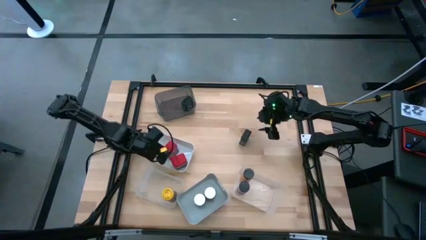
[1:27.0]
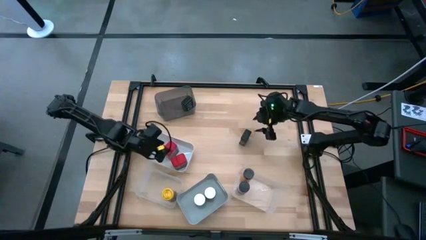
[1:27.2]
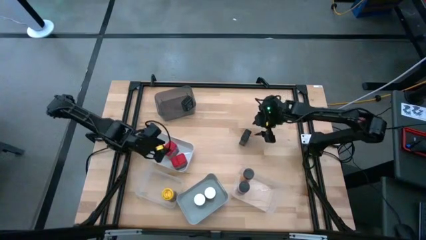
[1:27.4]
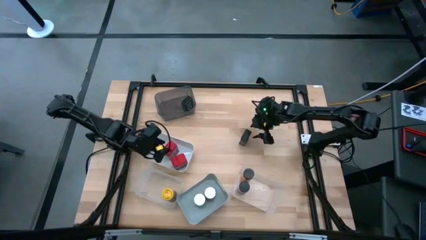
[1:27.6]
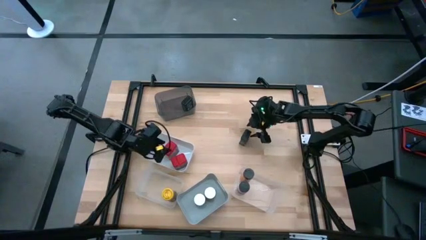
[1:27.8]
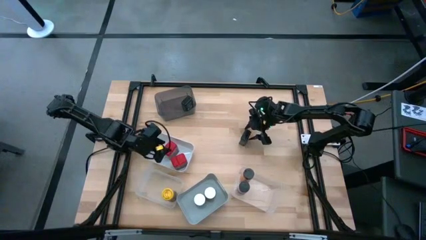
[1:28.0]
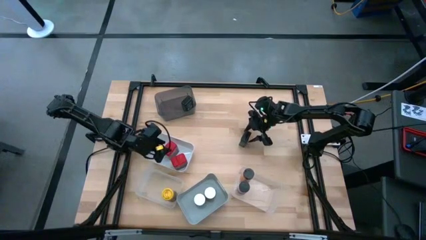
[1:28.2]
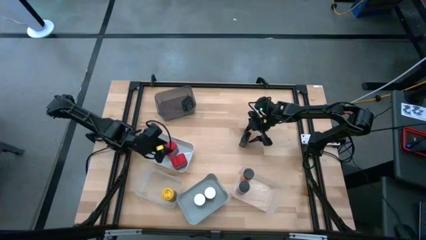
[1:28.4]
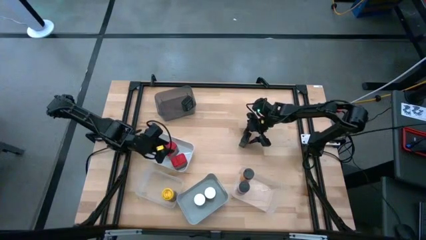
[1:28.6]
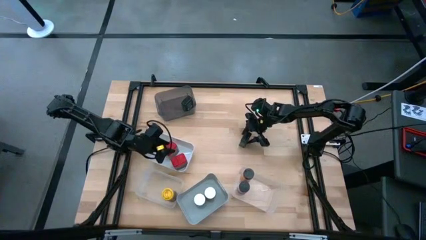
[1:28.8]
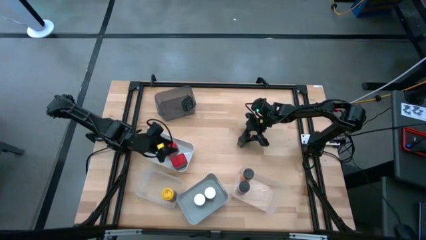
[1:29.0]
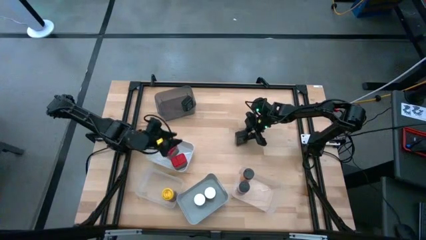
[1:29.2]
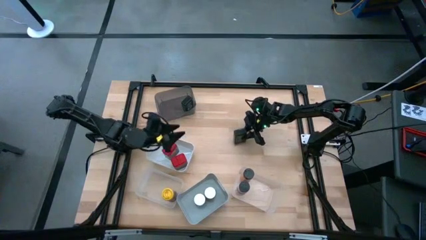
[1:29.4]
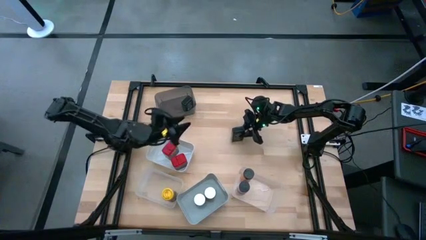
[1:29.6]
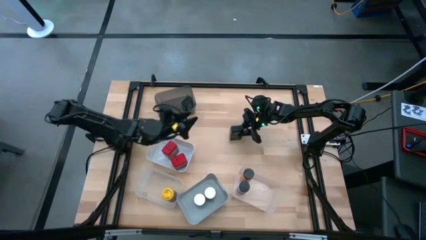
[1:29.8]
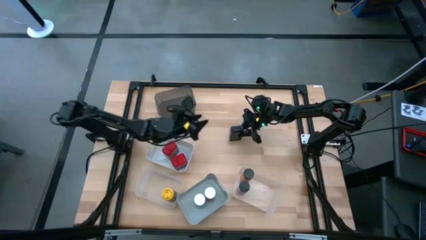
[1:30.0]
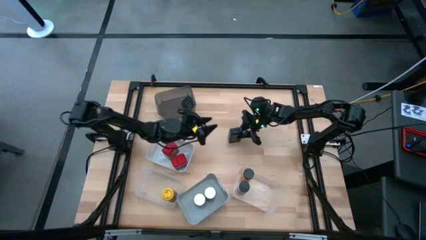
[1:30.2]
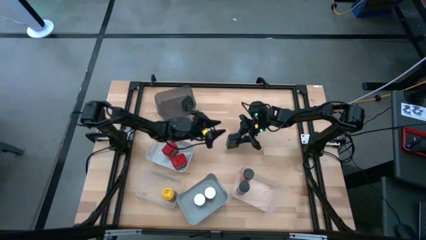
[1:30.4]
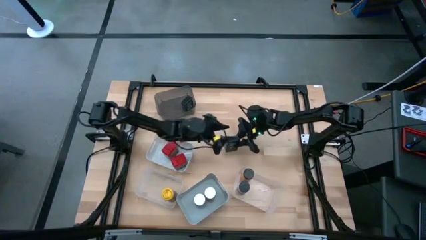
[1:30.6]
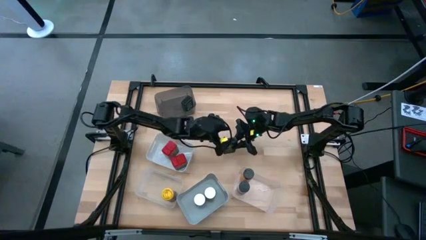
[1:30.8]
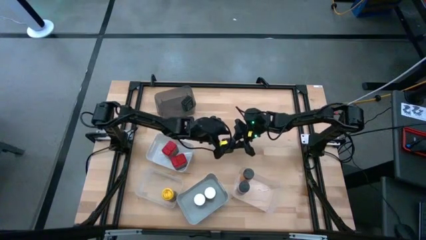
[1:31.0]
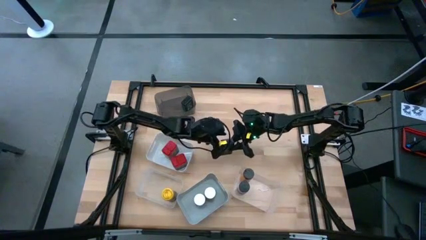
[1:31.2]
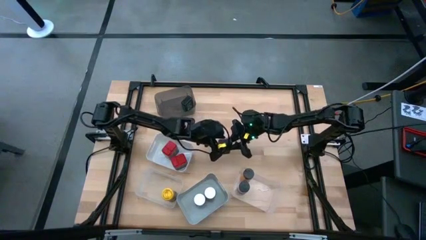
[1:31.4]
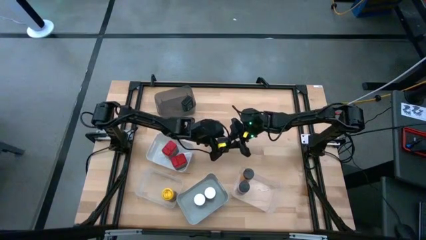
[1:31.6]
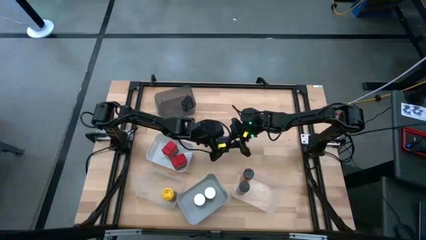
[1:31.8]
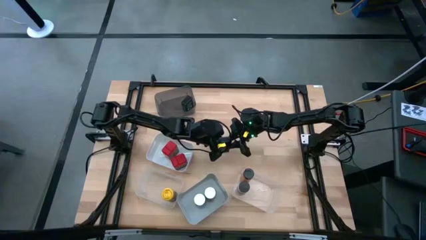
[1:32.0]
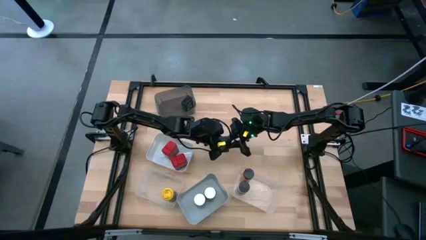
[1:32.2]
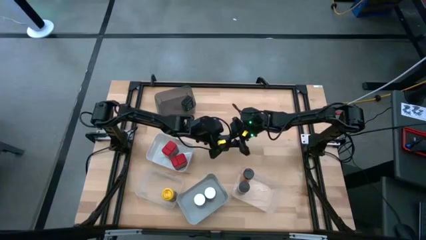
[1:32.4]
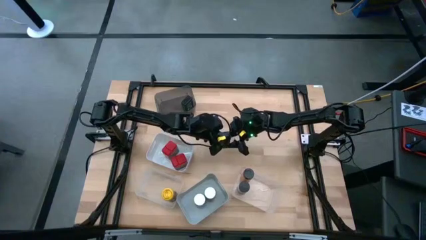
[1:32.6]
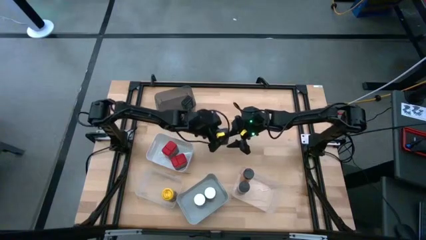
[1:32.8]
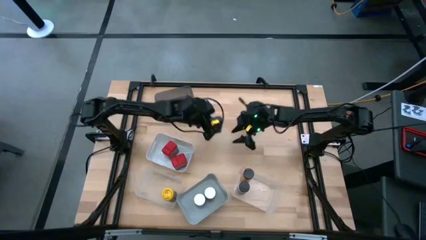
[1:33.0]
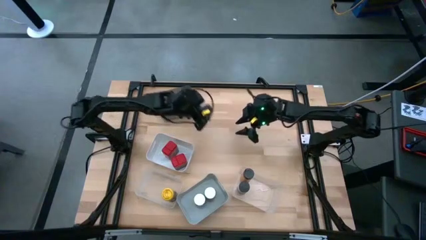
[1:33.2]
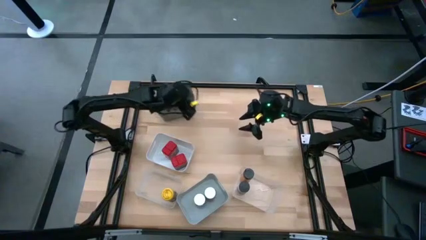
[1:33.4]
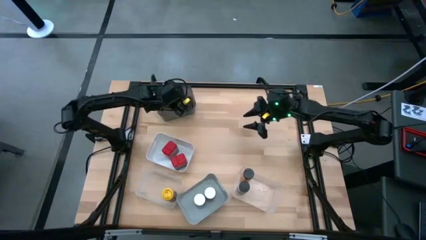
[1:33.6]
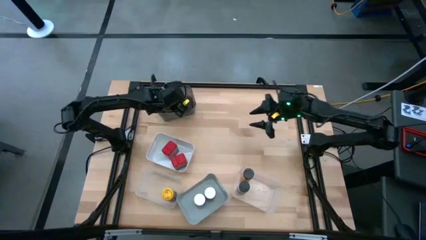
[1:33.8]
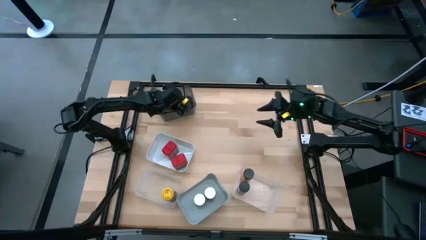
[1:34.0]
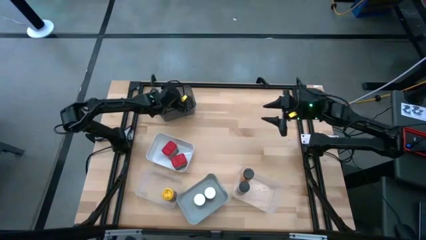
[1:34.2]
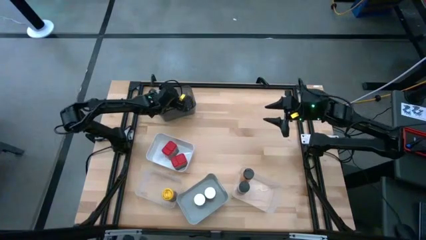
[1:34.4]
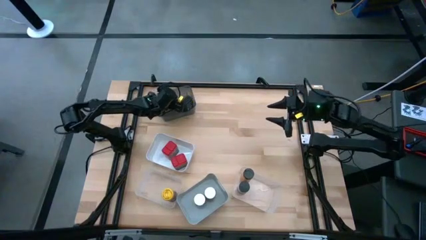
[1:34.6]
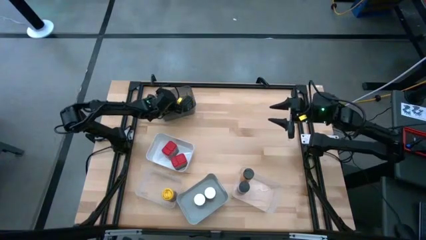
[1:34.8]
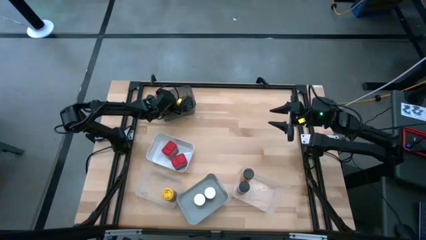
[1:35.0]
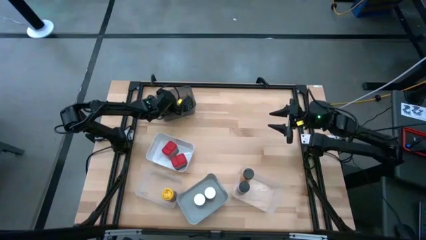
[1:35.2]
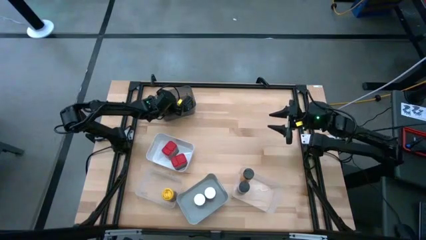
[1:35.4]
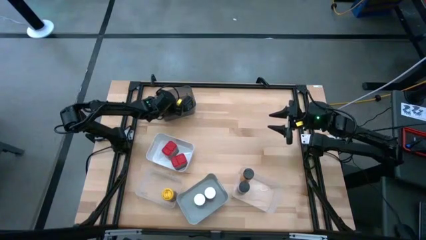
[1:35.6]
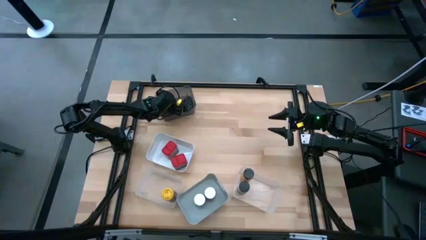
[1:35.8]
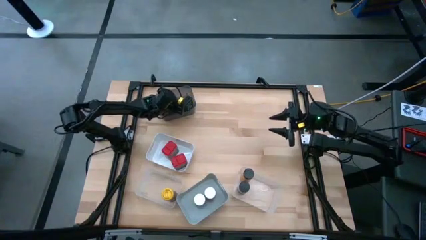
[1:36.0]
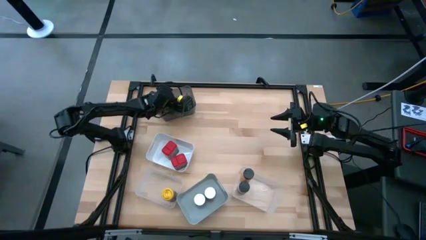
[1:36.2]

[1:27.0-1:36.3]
Task: Sort spices by type
Put the black seasoning can into the black bin

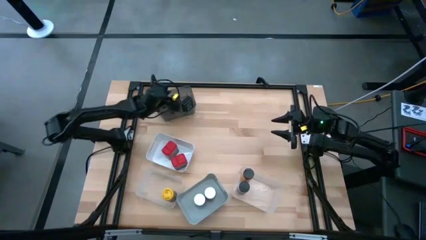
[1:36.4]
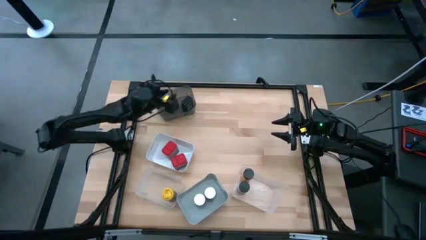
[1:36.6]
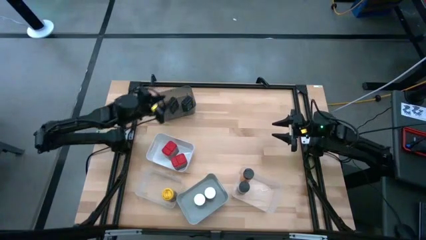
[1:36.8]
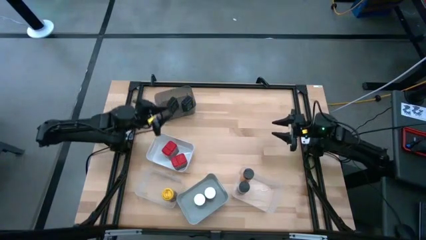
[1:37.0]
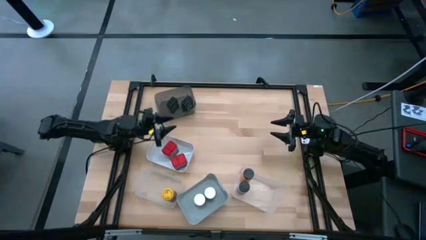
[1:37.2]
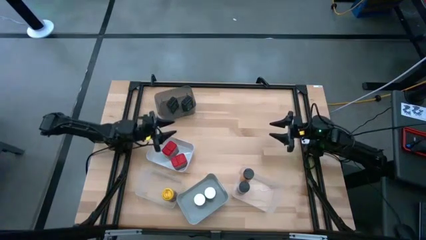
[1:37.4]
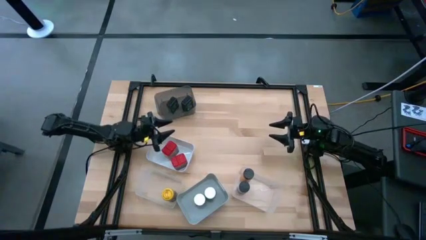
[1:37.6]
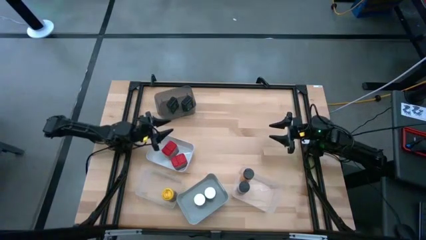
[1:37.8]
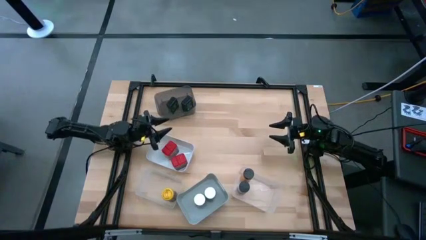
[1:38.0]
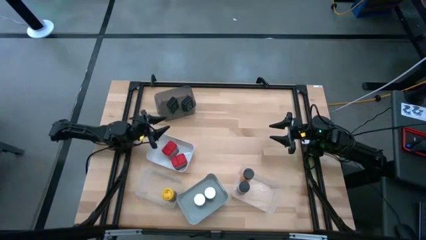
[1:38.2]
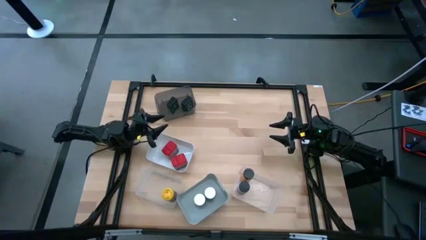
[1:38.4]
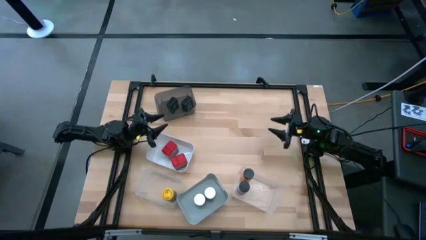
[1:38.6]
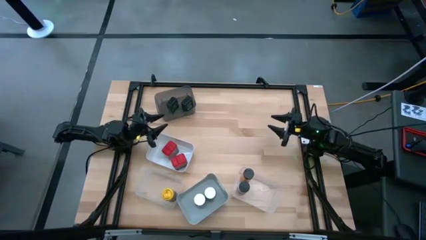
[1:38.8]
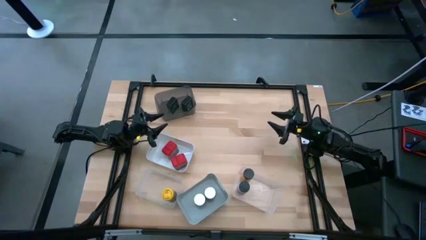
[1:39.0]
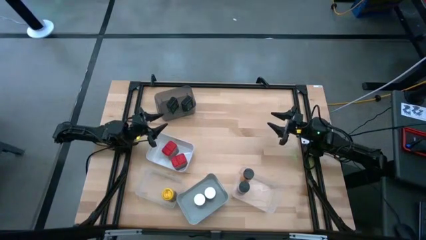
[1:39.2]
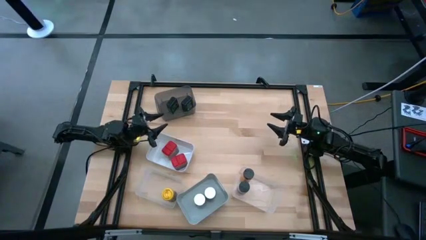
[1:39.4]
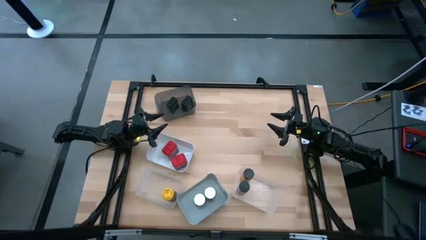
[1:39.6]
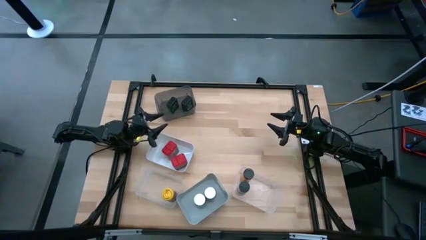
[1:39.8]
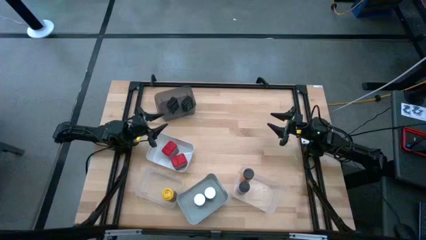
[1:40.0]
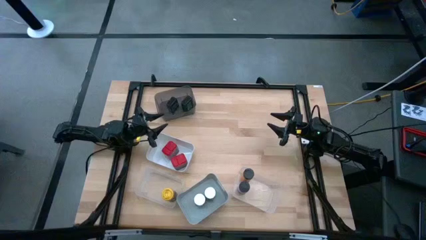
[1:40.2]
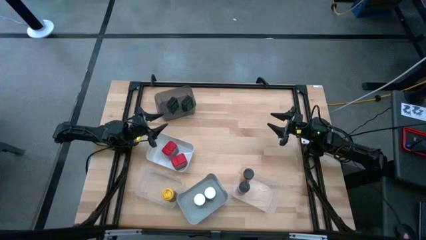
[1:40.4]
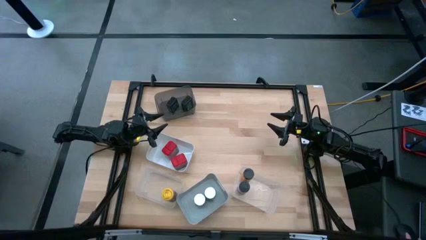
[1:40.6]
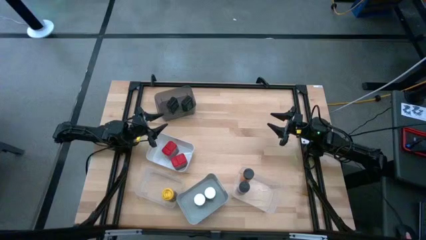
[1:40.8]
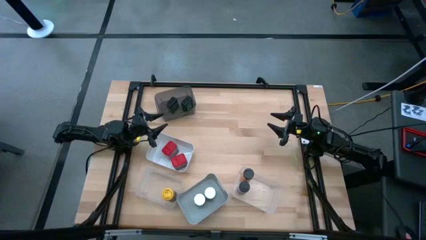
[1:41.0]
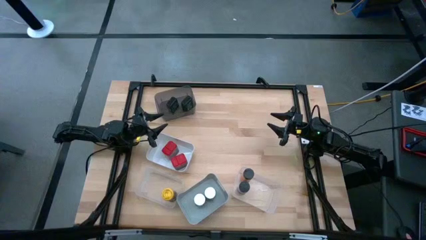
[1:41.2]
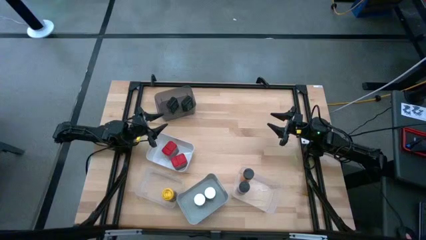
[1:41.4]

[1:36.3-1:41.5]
Return to Home Position

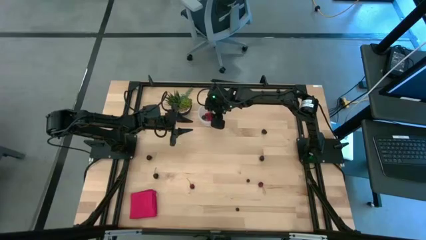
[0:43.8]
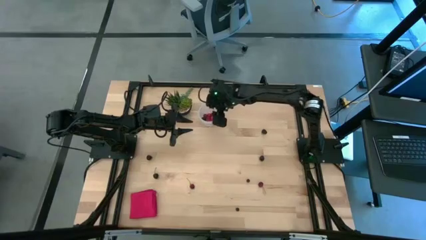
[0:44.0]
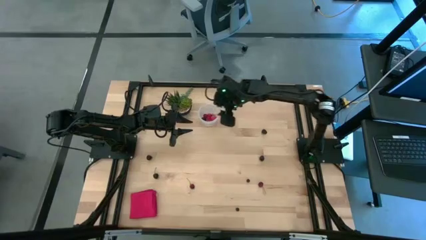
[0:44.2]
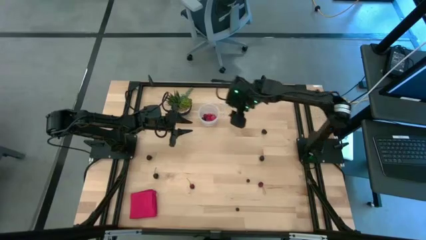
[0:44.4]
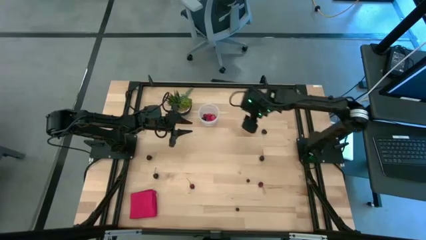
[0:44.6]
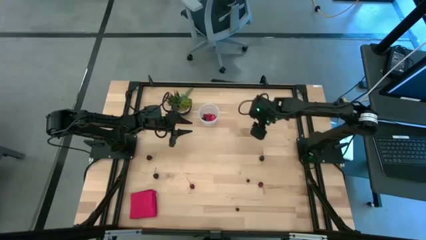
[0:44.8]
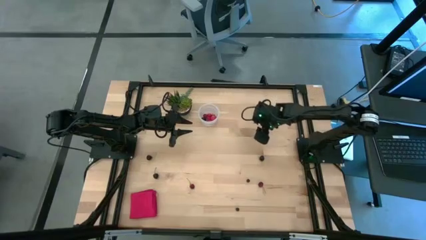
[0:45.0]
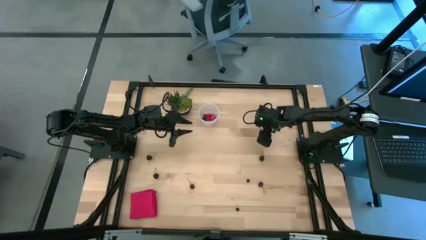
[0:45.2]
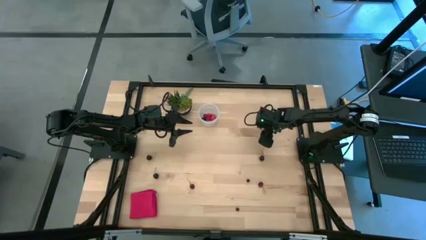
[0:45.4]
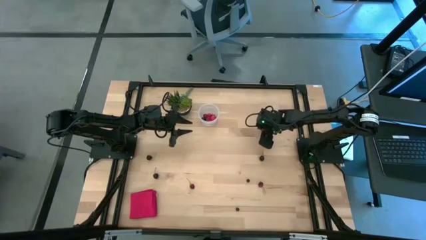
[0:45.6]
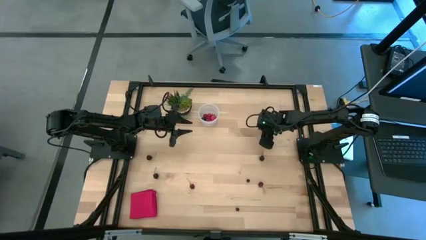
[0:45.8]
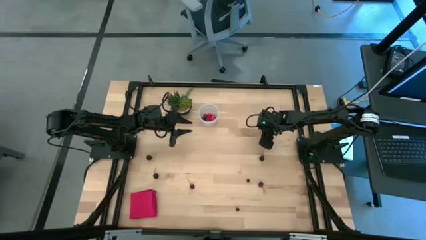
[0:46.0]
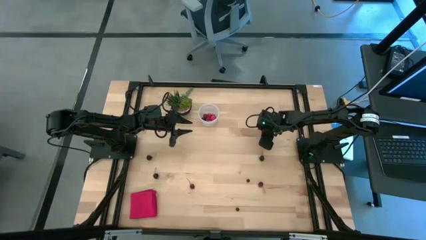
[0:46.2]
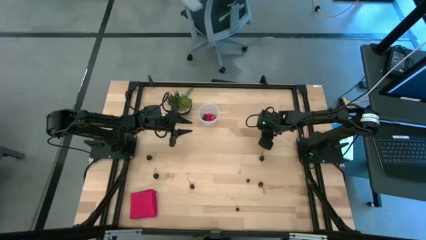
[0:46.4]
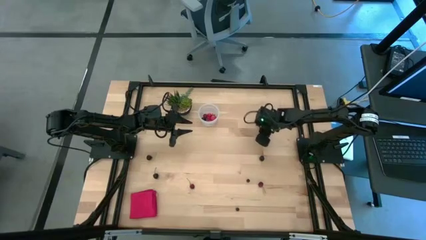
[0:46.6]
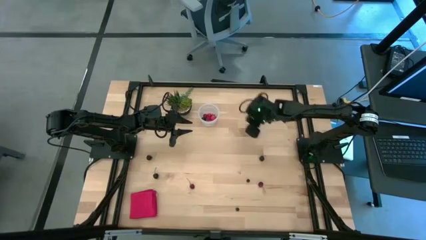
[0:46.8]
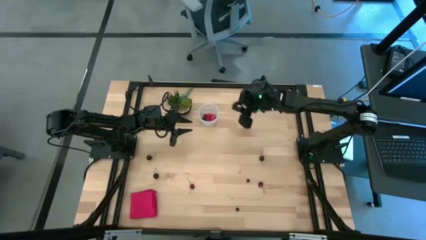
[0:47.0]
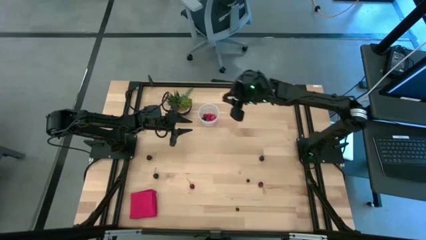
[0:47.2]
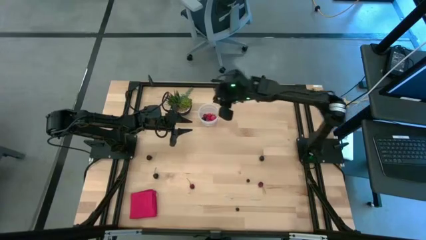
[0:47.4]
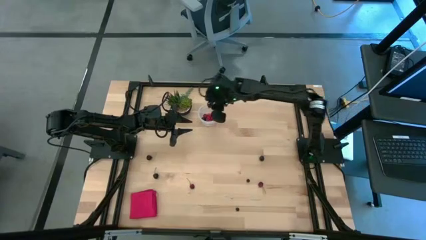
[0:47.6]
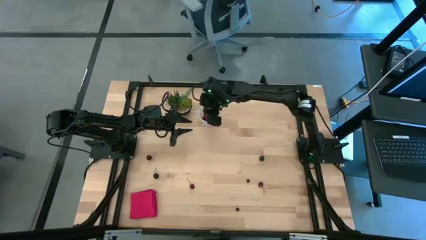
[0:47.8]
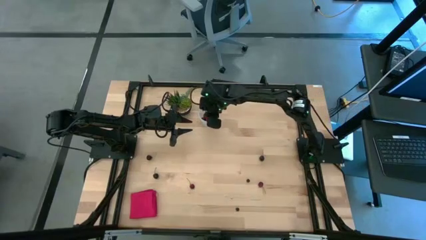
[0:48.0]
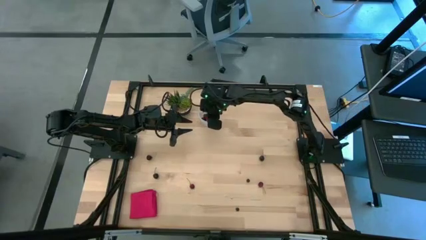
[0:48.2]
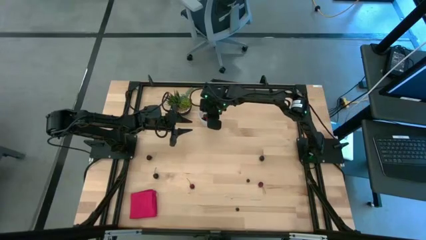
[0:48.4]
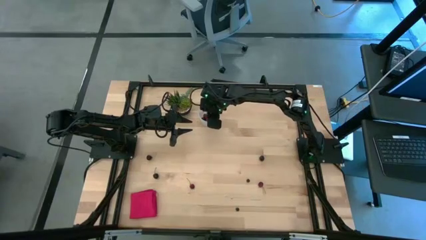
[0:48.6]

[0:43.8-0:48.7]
Task: Pick and placing Produce into tupperware
Put the blackberry into the transparent container
